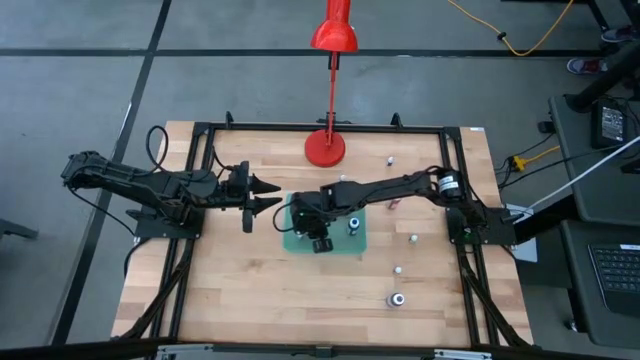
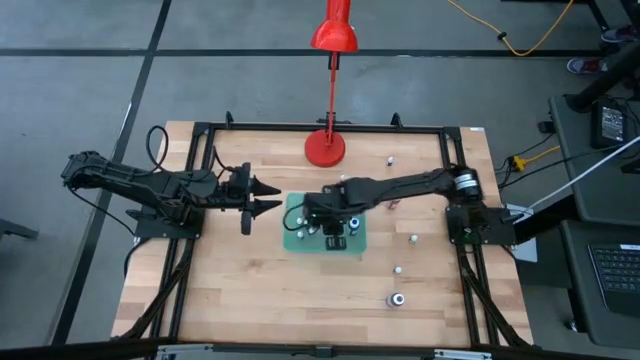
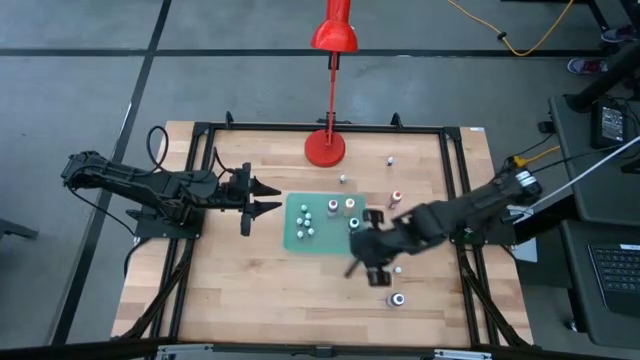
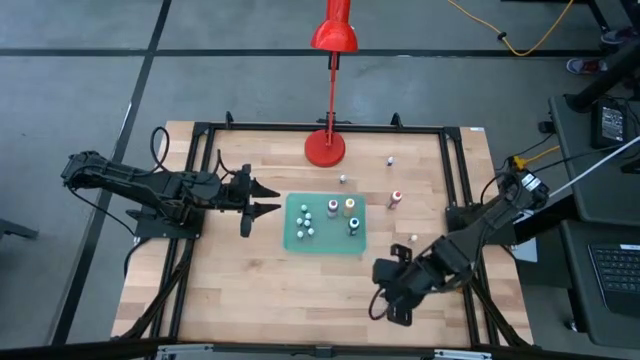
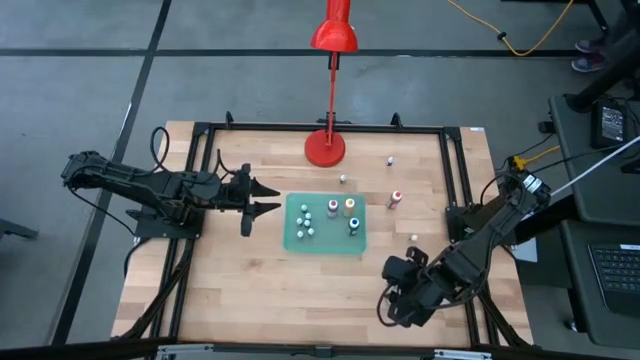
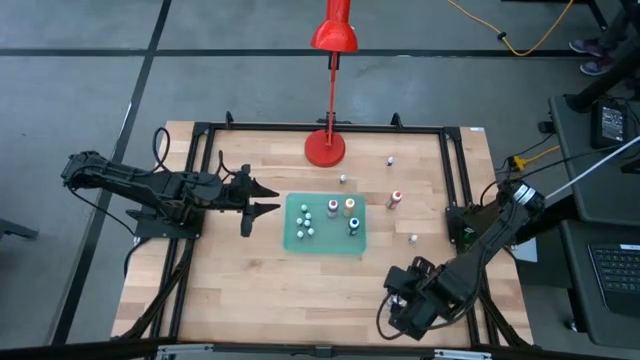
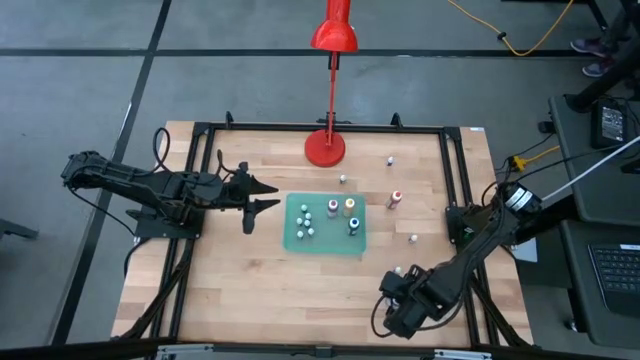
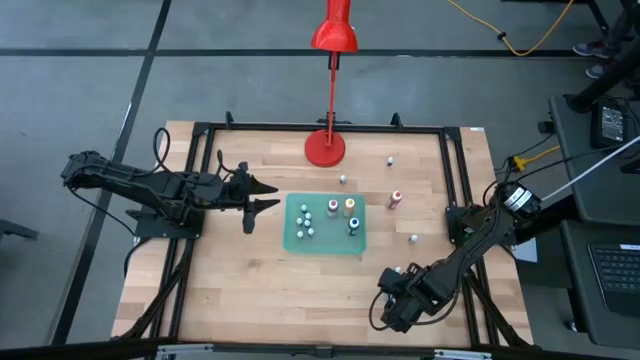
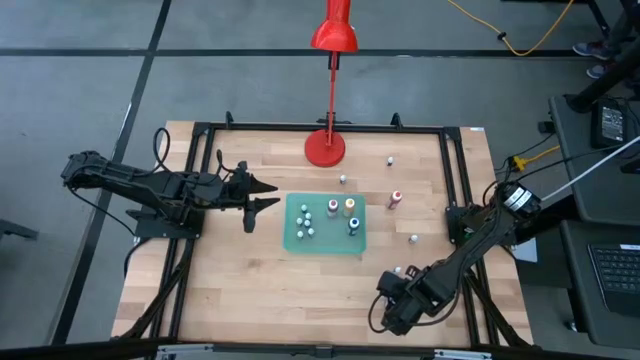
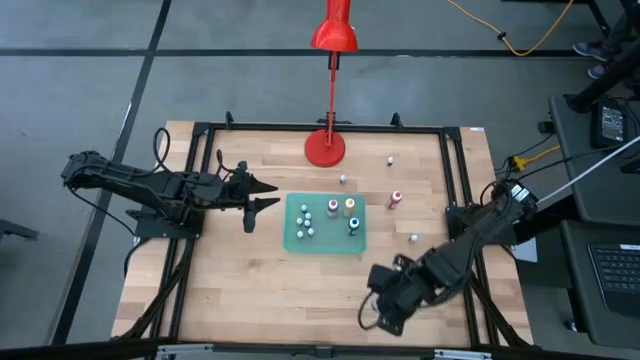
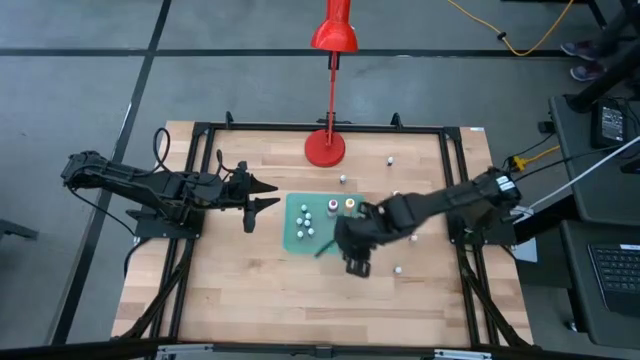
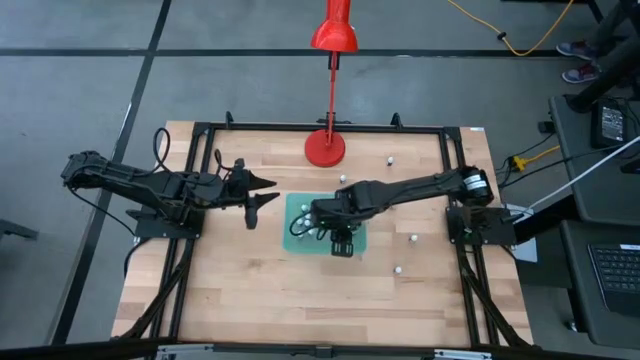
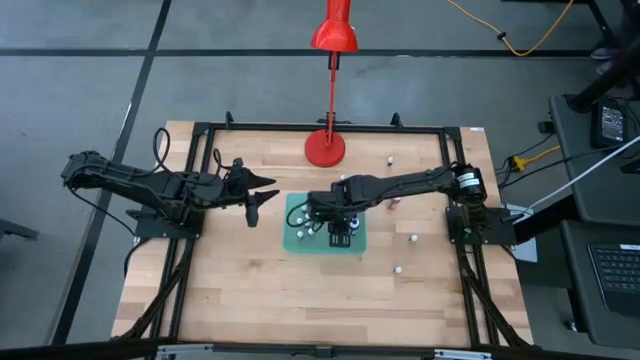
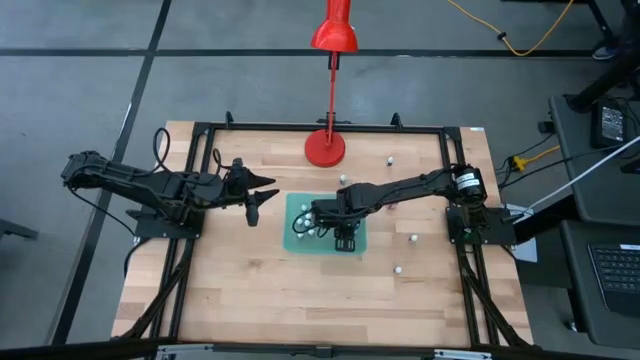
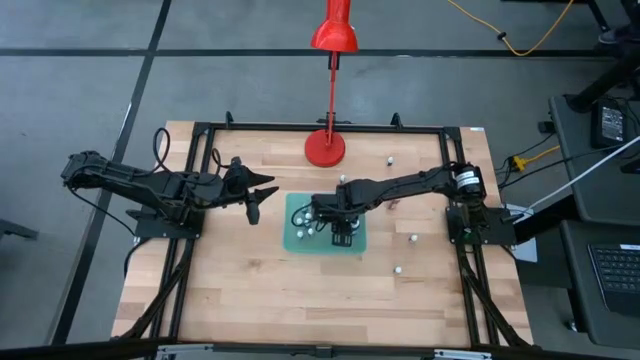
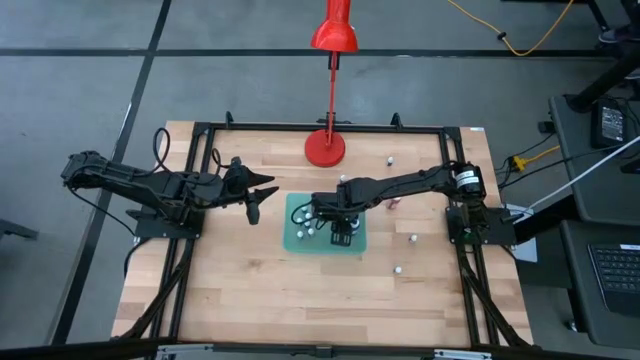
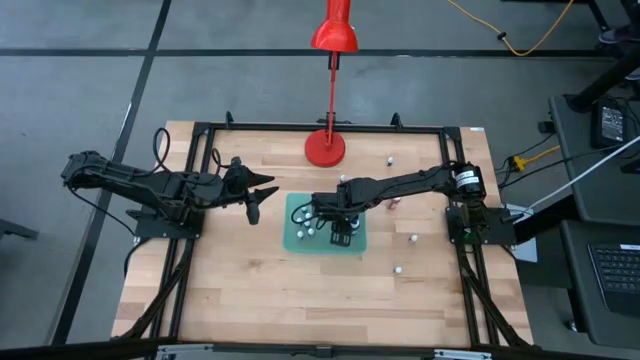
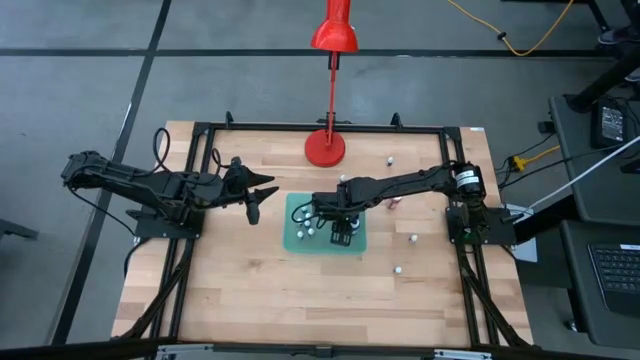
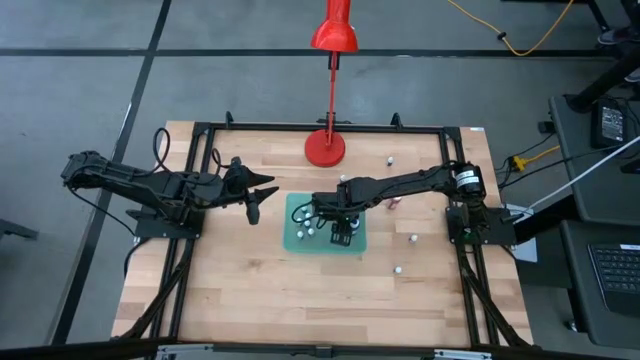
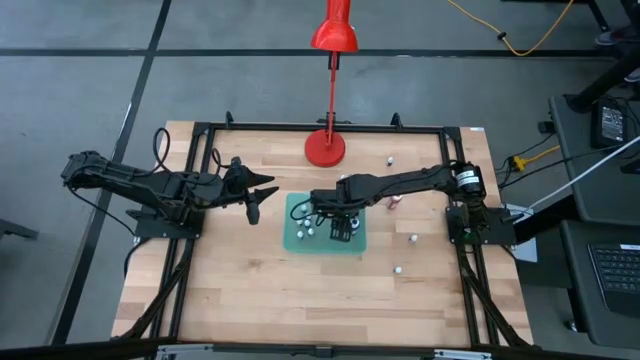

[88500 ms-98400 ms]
Task: Pick & Place food coloring
Put the large purple food coloring bottle into the green bin

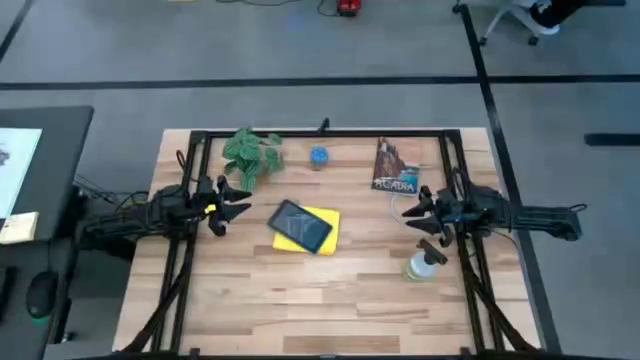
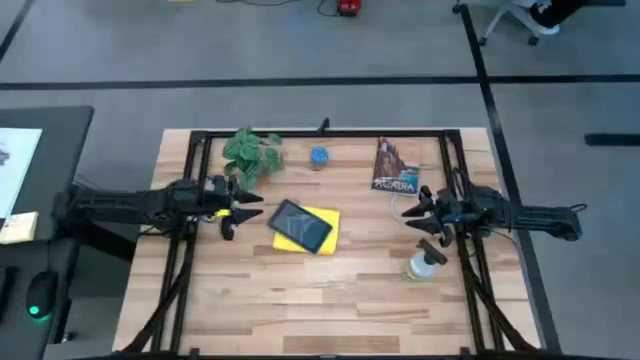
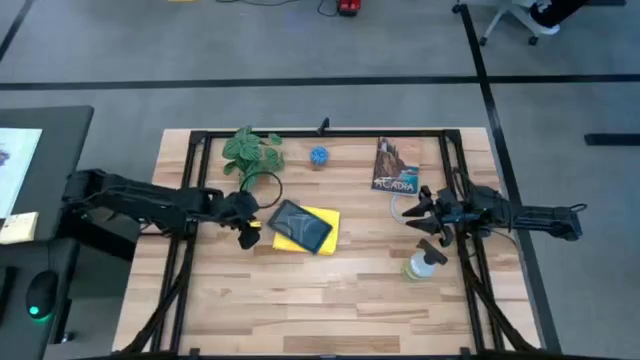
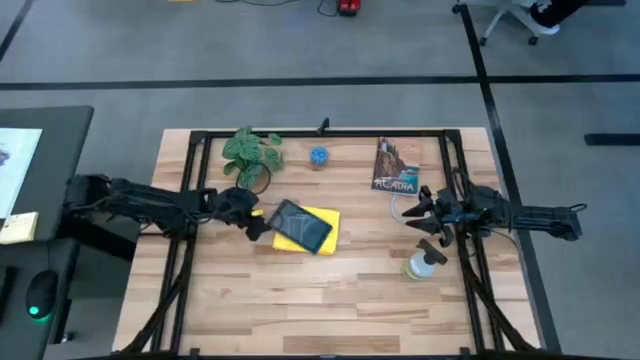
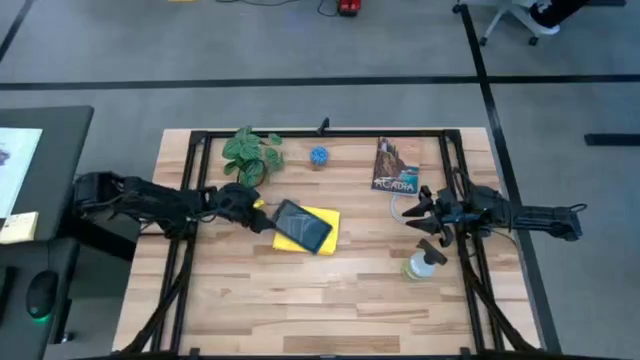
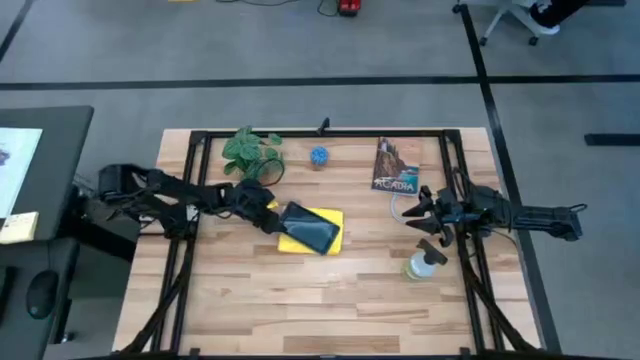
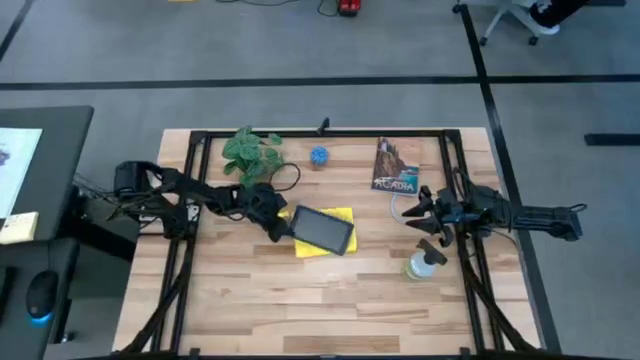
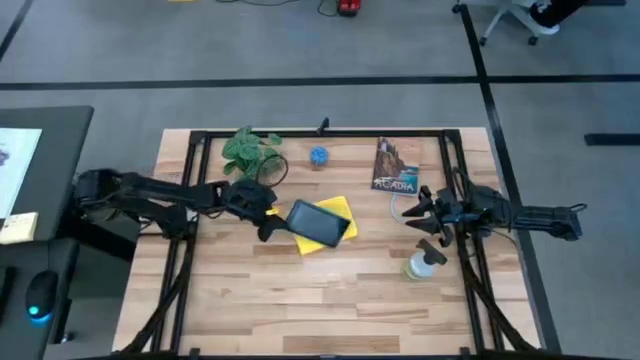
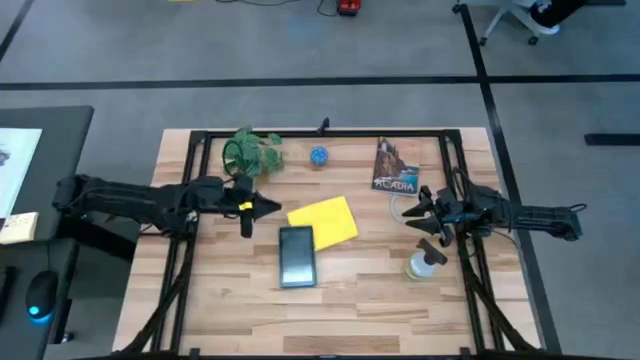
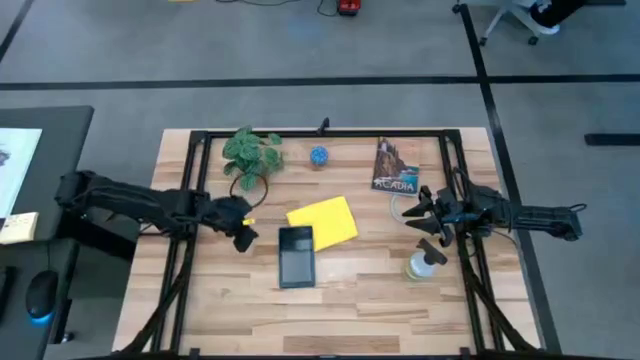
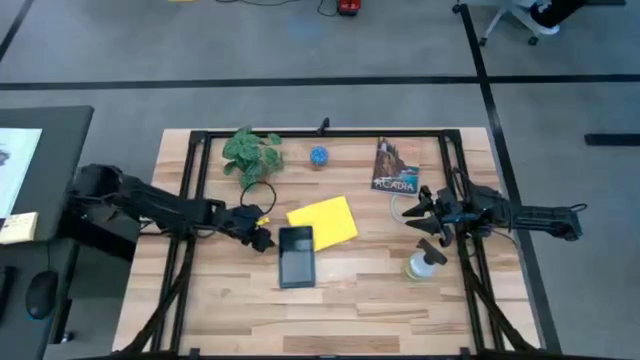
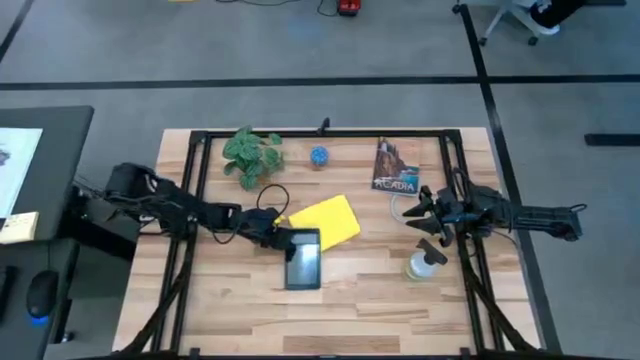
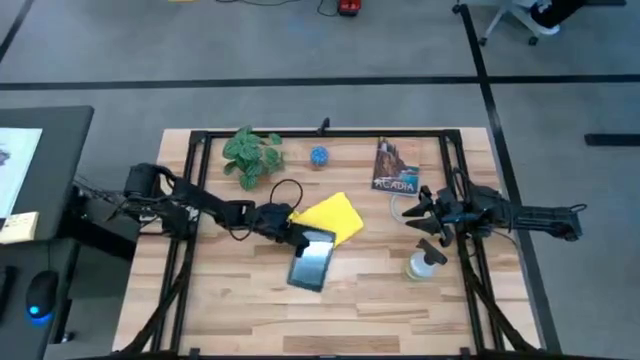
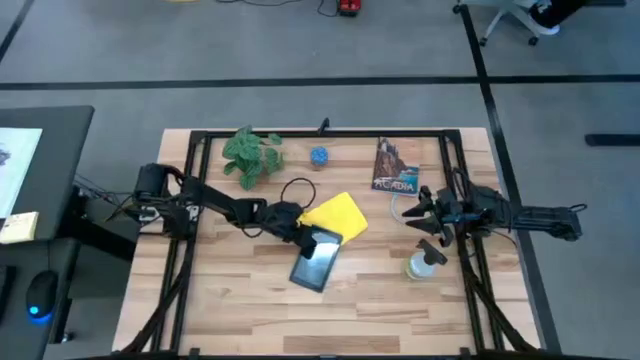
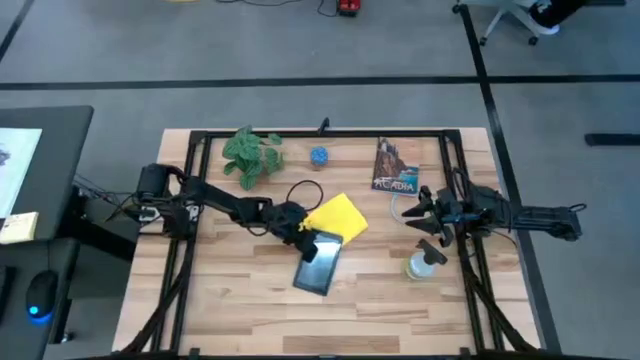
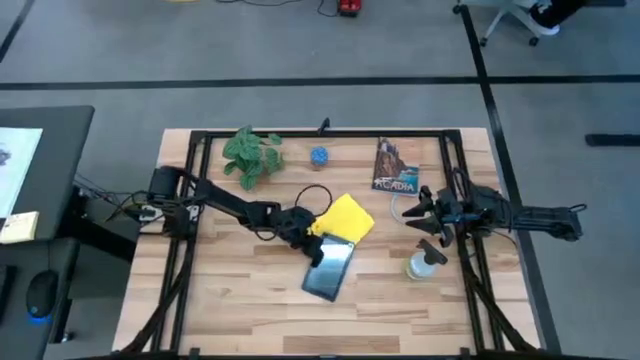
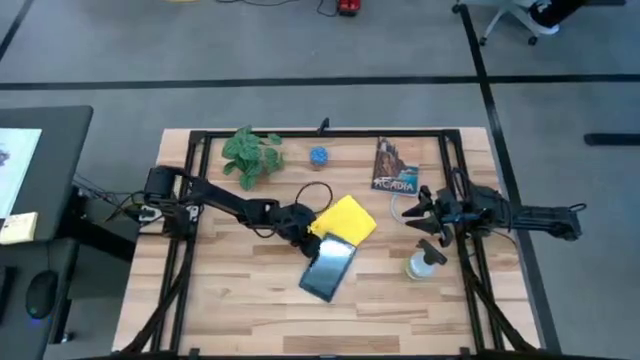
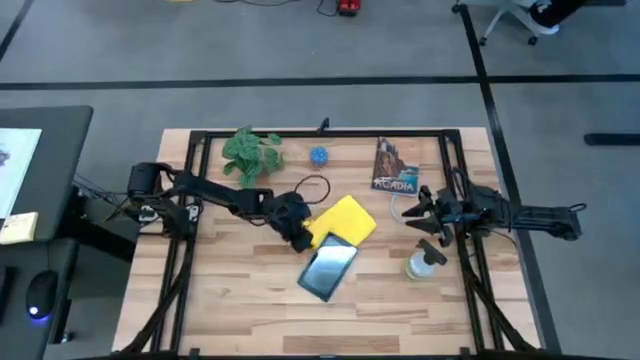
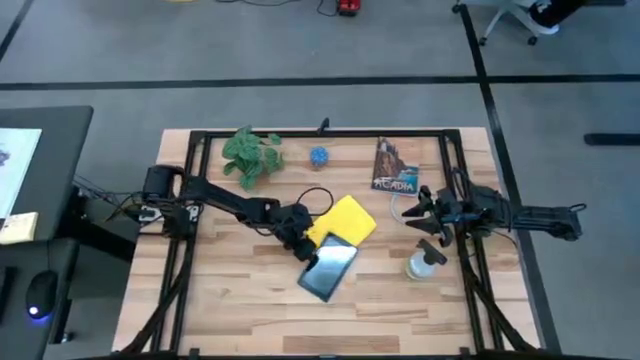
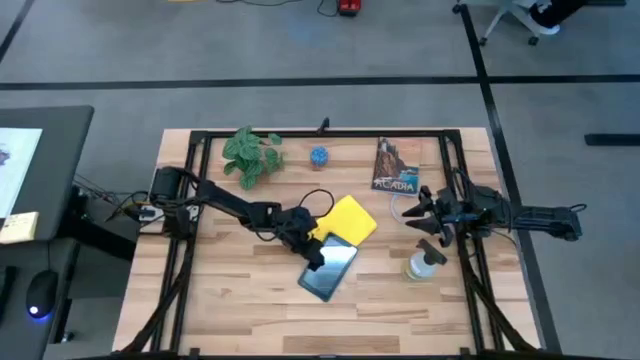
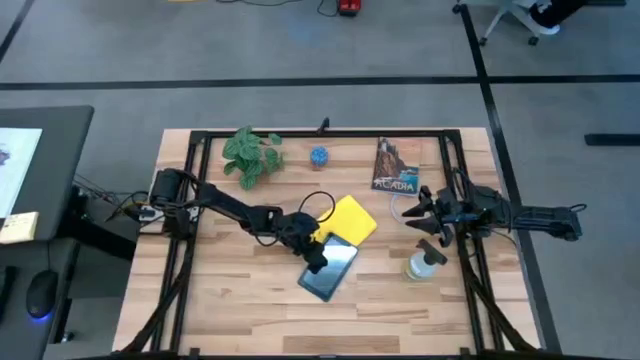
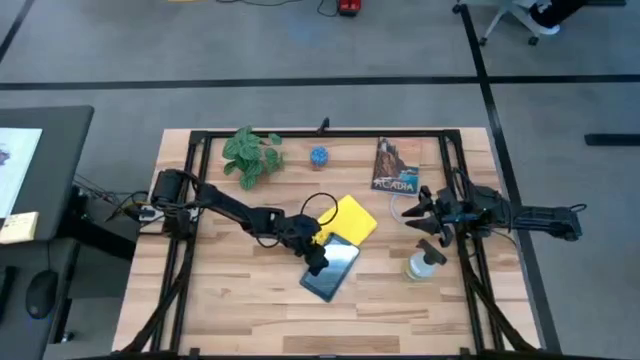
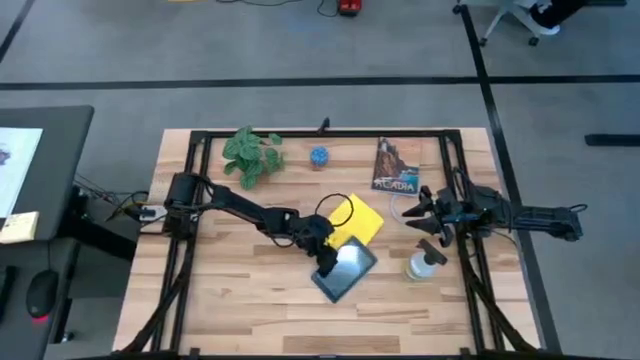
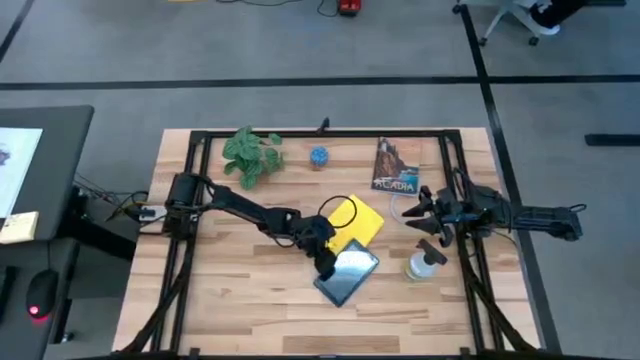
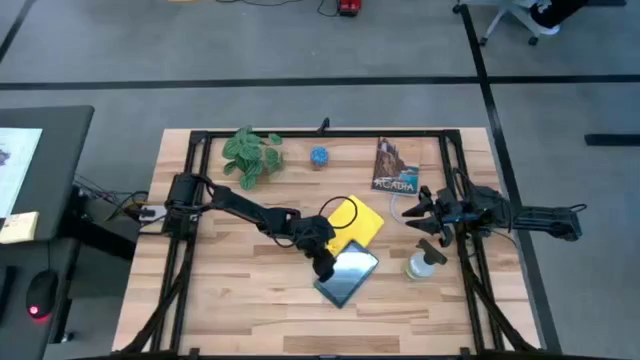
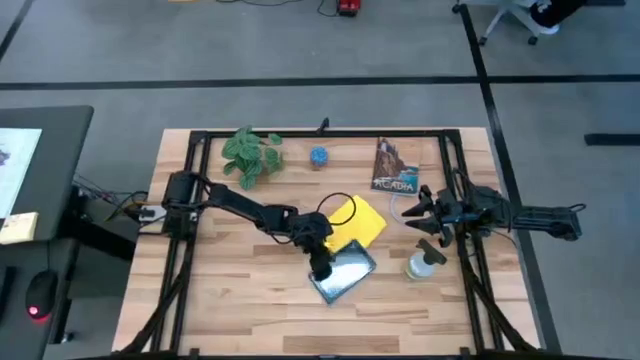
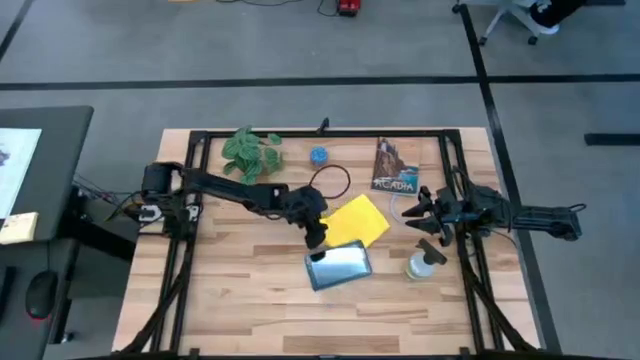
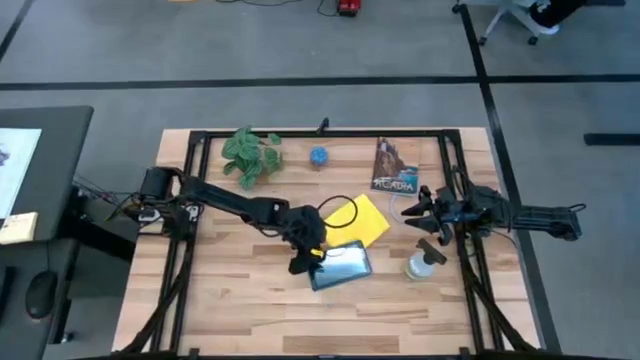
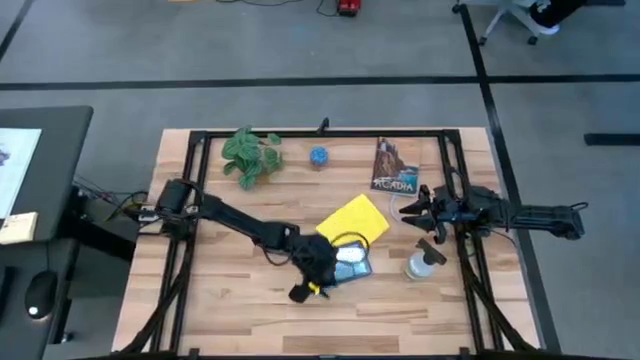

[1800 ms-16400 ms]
Task: Apply microfiber cloth
Prepare the blue tablet
